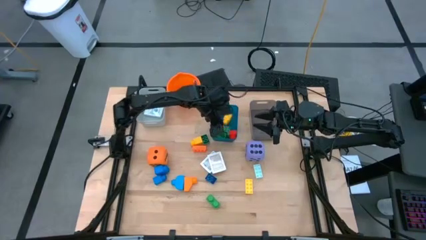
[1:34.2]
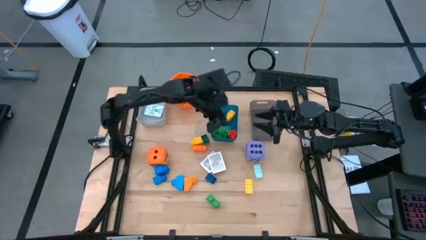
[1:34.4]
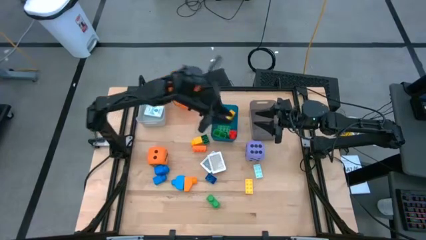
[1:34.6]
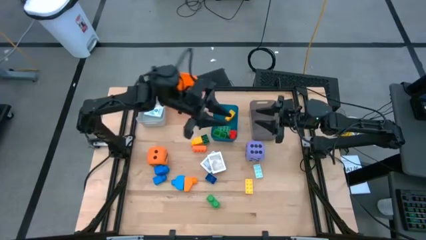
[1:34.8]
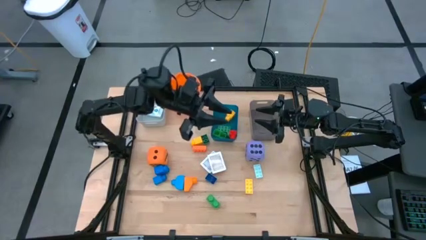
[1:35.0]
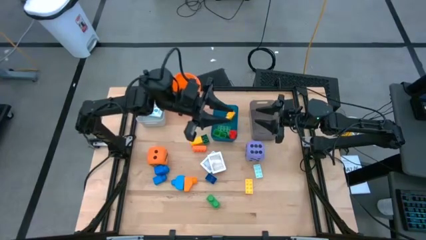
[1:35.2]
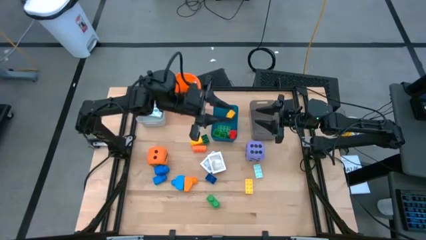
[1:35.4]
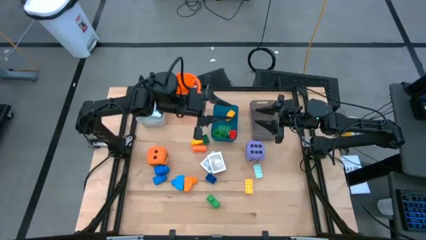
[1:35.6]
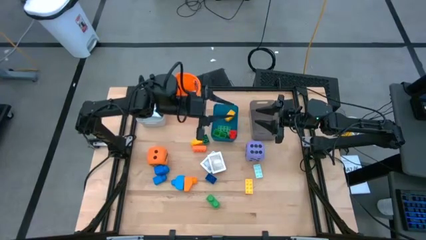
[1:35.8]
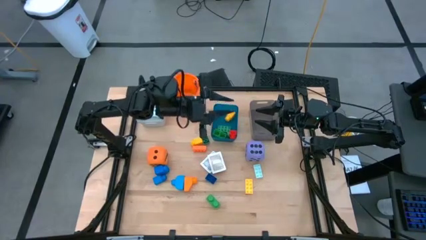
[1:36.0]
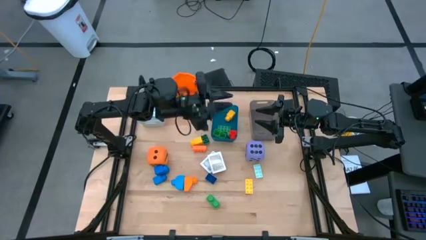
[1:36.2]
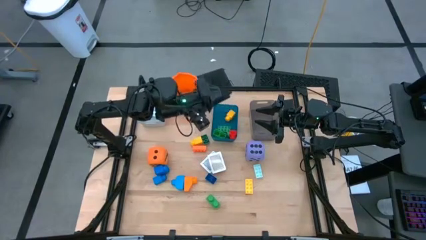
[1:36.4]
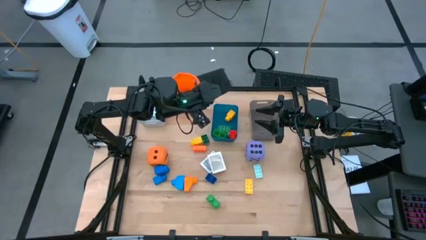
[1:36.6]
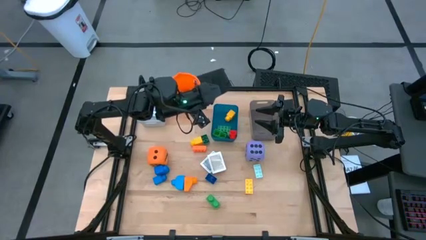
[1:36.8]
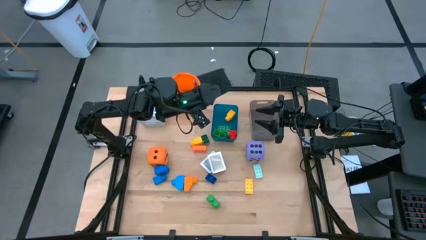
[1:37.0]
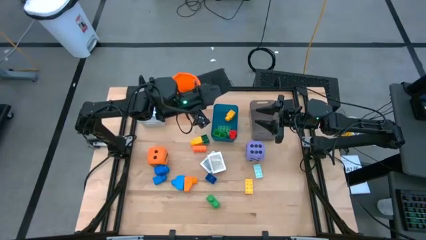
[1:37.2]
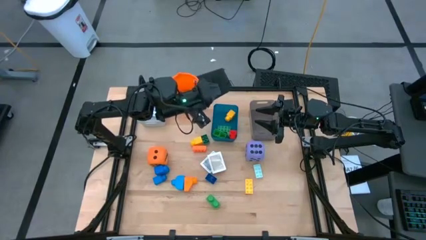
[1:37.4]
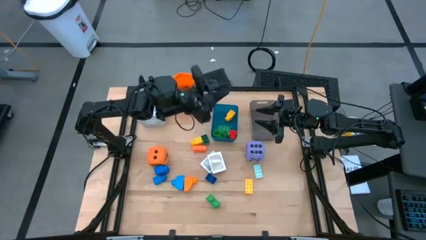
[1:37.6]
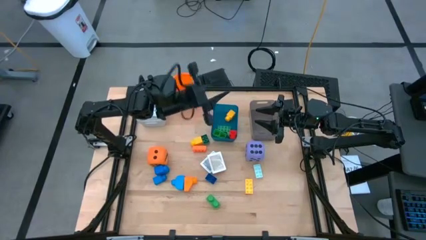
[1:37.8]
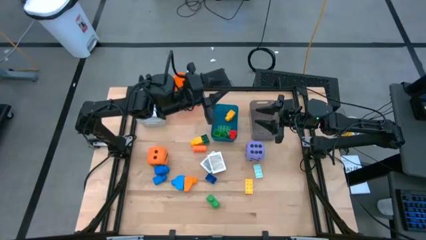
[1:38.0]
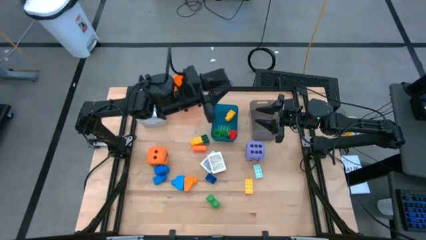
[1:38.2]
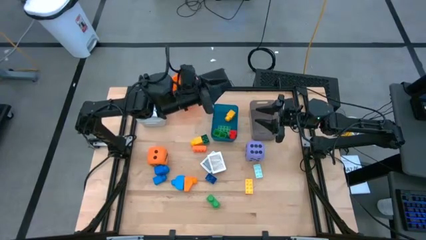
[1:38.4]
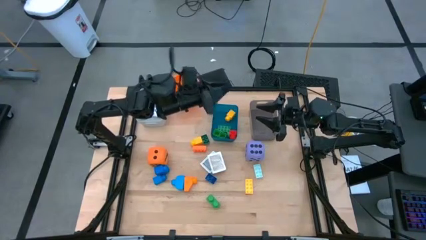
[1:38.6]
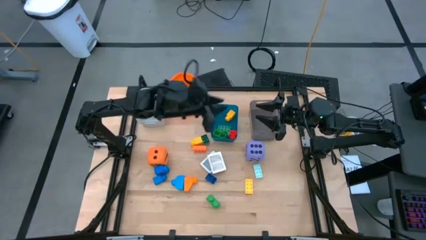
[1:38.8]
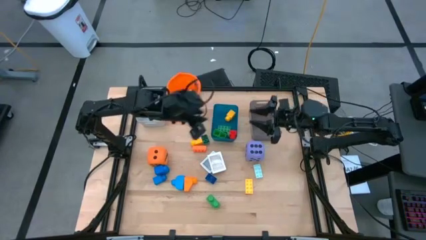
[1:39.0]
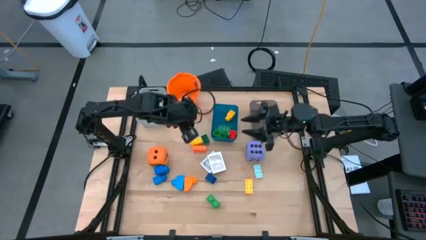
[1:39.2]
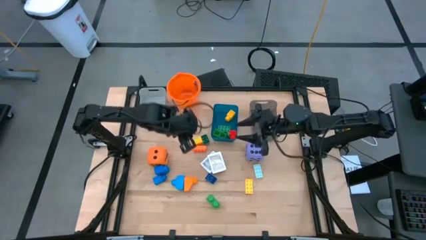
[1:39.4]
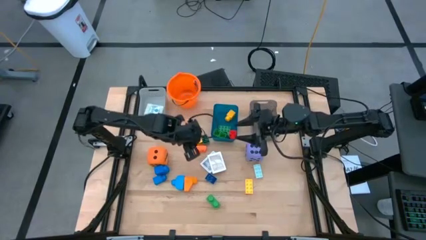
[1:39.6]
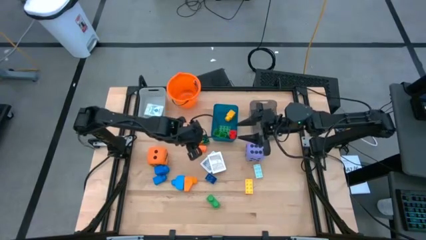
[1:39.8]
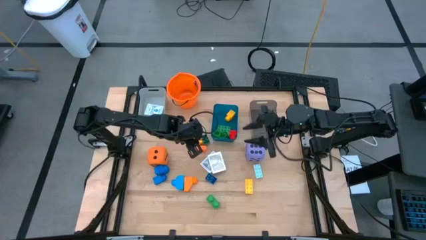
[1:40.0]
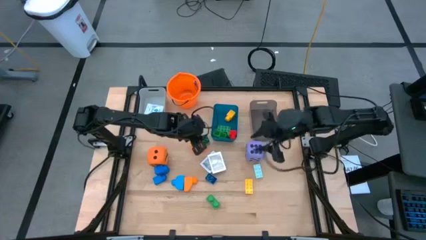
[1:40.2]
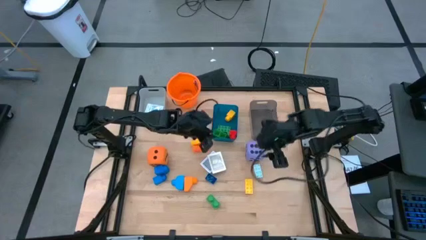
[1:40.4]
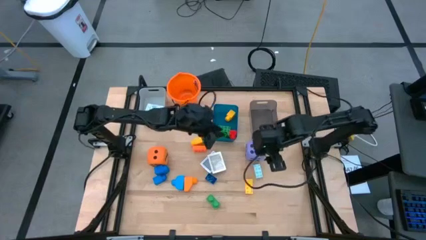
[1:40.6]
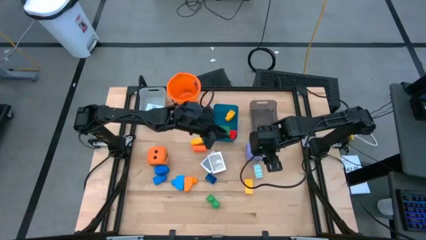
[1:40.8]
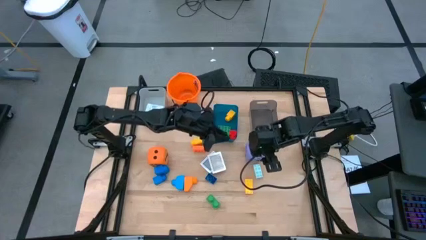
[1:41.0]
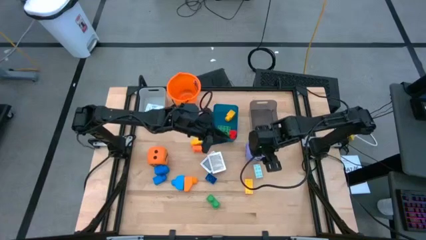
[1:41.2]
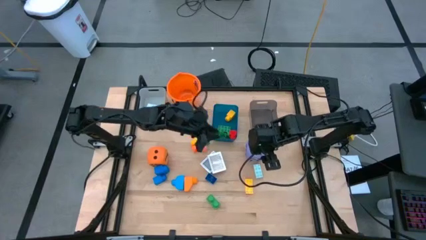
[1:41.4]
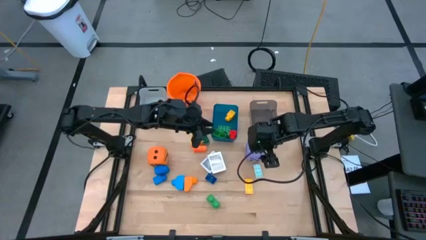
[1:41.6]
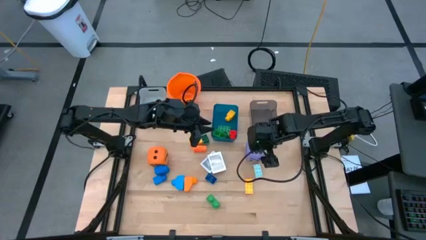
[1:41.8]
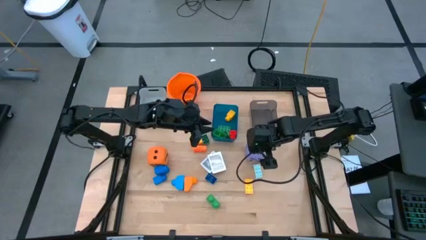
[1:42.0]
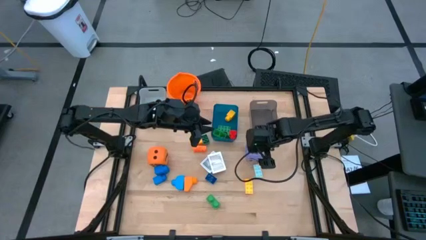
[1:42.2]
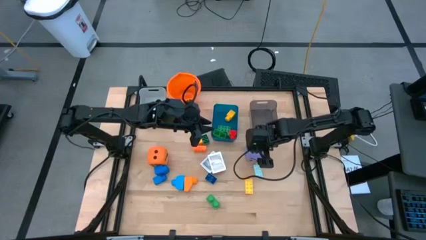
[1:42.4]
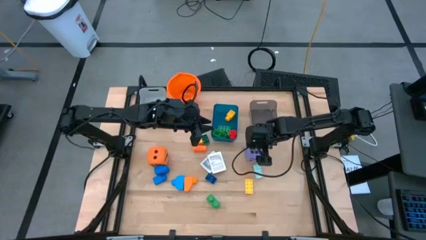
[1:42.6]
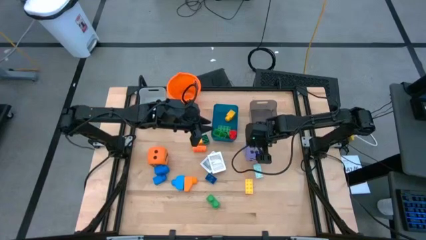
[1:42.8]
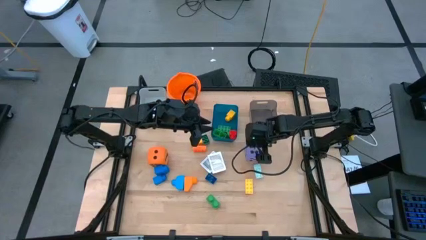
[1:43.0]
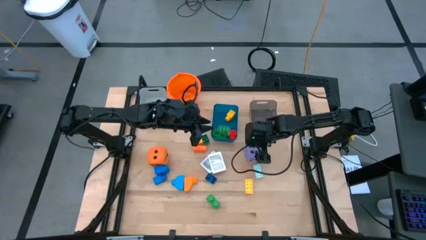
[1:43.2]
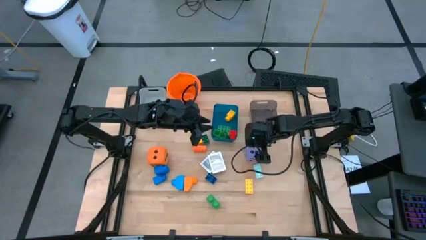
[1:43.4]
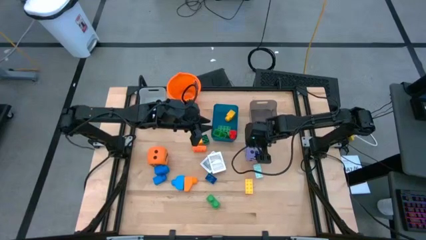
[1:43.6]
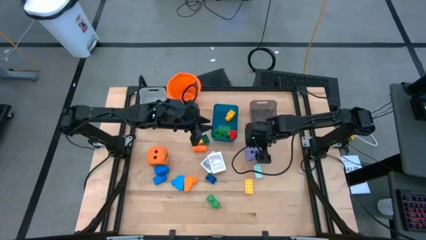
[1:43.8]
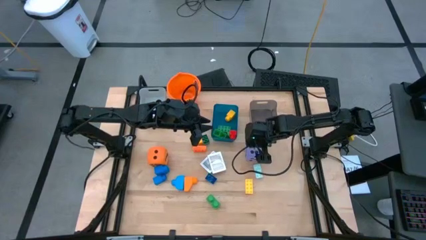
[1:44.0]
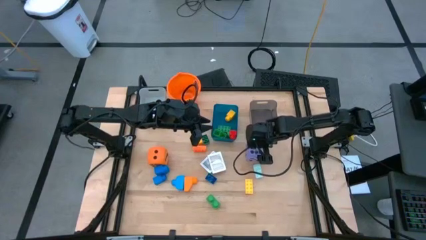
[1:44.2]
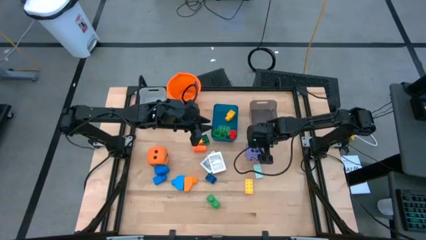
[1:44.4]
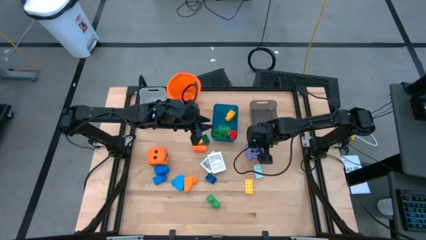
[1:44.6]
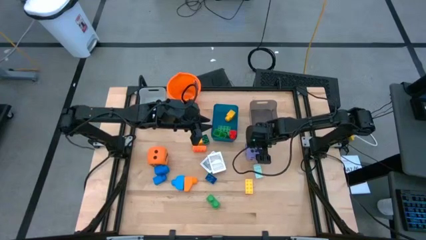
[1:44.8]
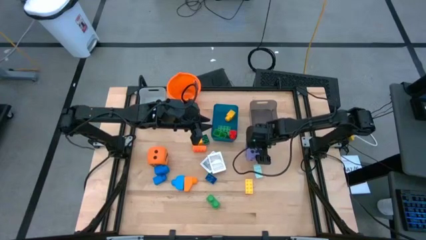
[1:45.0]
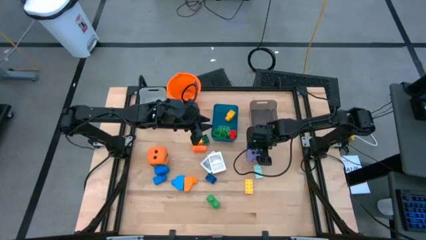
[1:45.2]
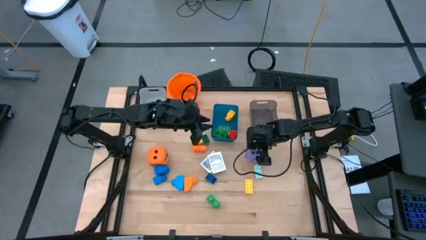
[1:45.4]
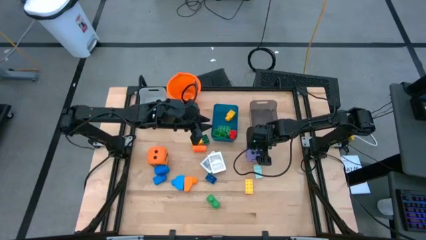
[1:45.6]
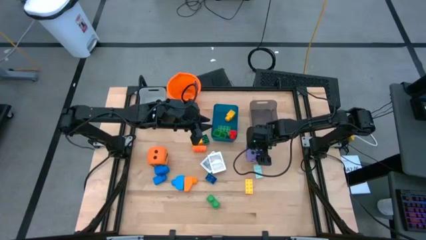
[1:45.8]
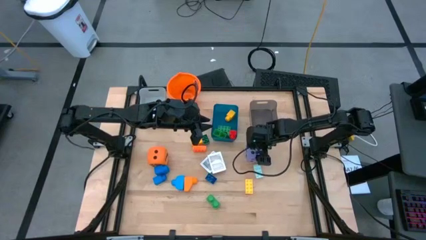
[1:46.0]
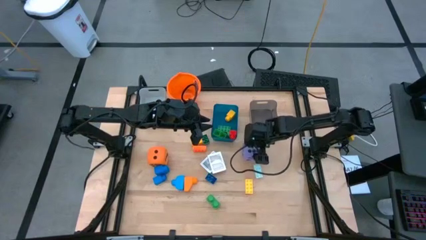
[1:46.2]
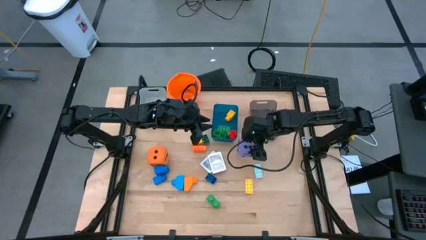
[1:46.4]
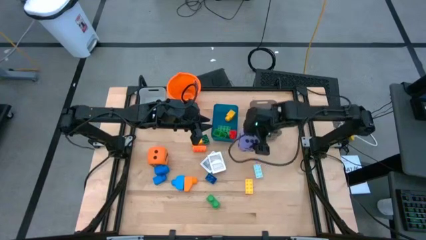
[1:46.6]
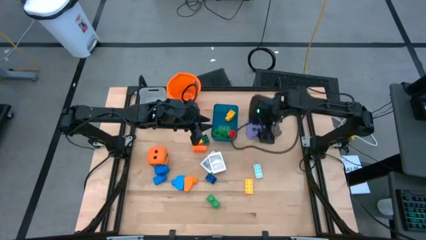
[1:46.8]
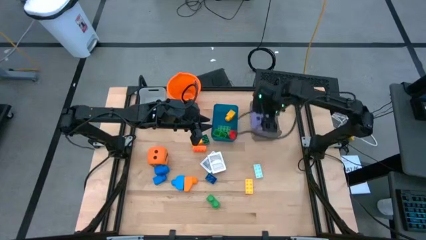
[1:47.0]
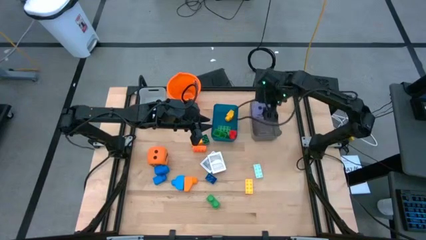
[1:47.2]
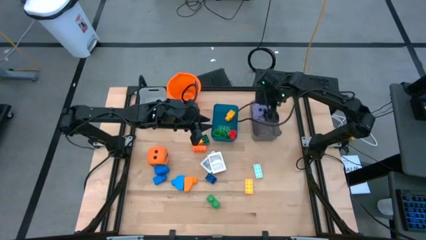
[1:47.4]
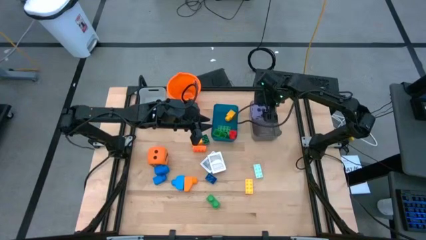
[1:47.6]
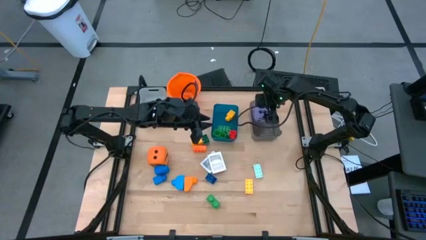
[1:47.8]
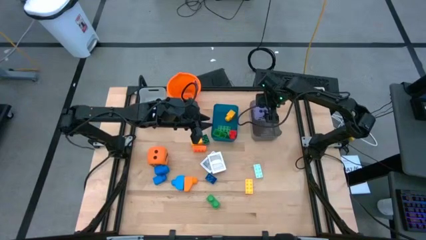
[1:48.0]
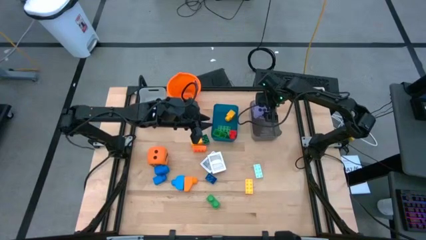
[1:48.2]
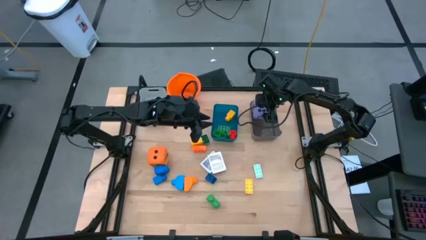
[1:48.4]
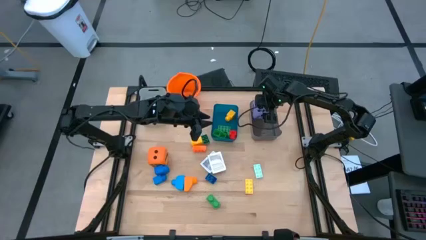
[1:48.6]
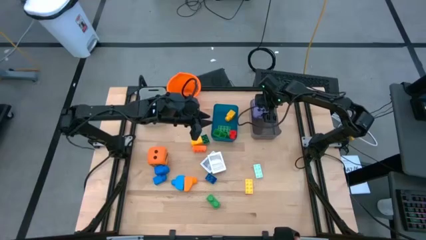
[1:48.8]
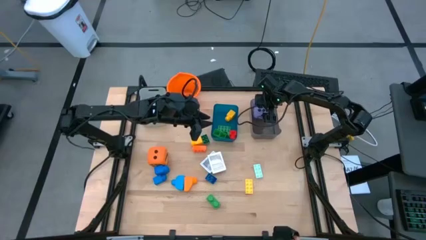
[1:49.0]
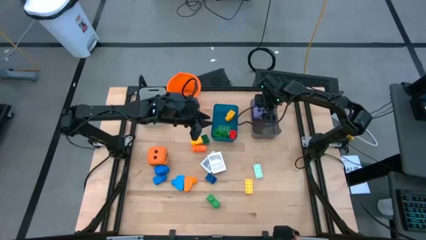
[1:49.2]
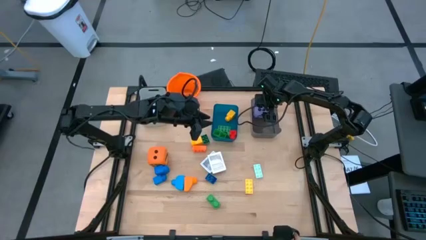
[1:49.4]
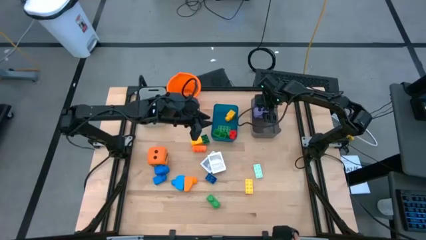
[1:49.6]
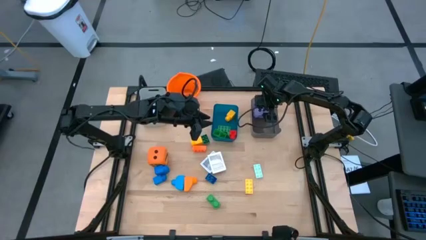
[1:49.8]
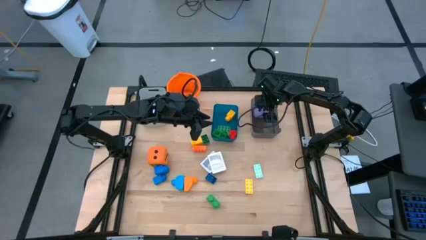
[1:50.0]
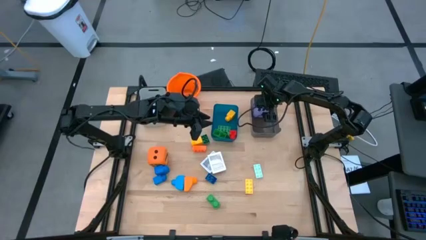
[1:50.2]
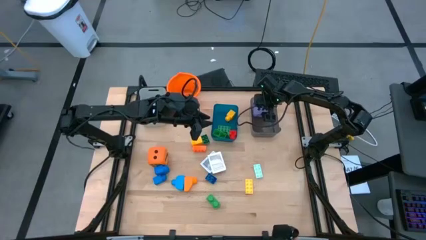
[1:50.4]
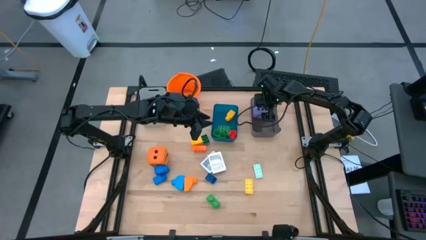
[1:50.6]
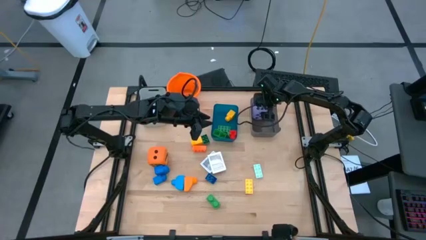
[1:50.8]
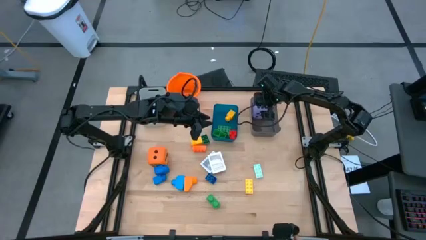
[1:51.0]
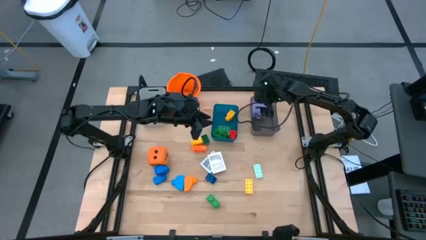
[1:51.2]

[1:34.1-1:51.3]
Task: Pick & Place Toys
Put the purple dice into the black bin
